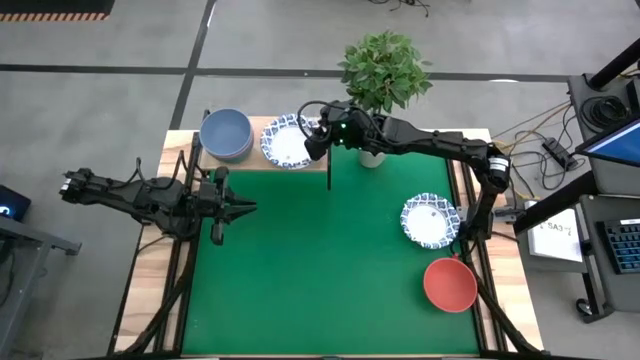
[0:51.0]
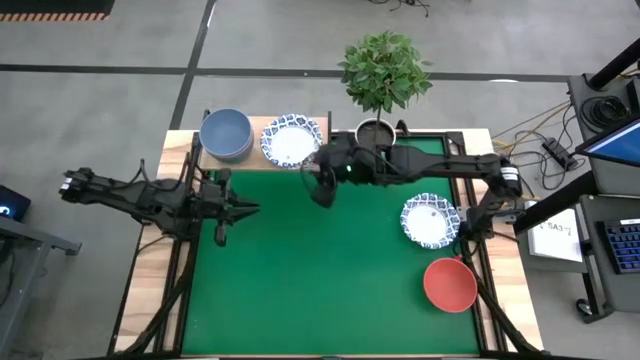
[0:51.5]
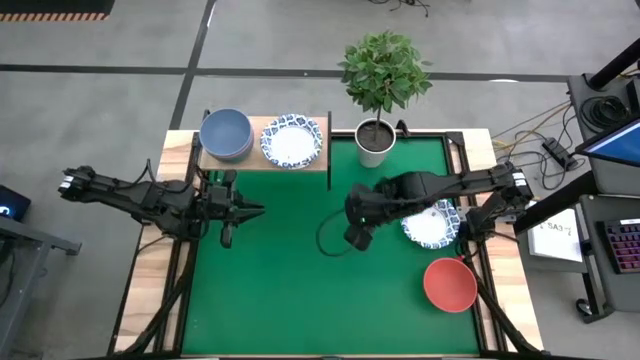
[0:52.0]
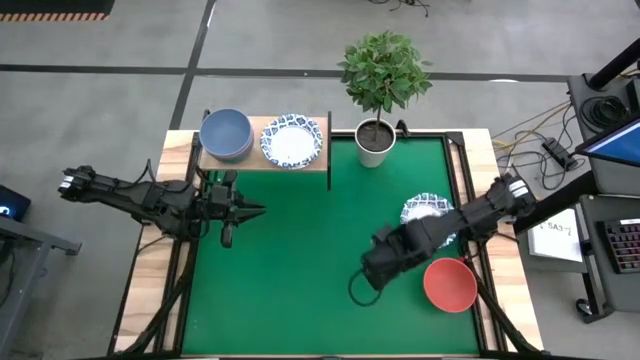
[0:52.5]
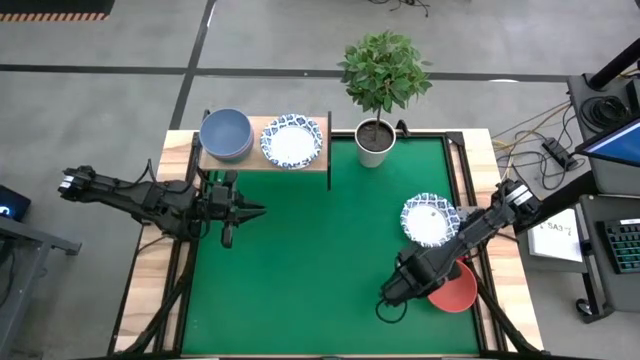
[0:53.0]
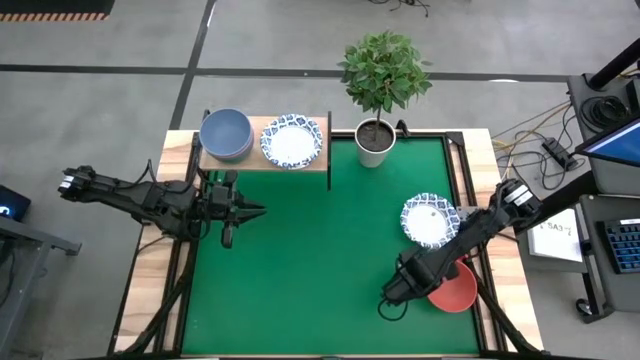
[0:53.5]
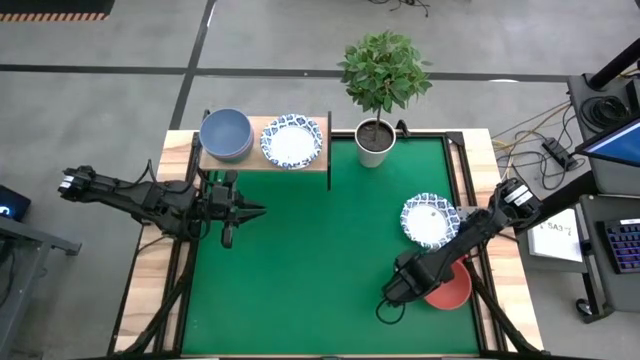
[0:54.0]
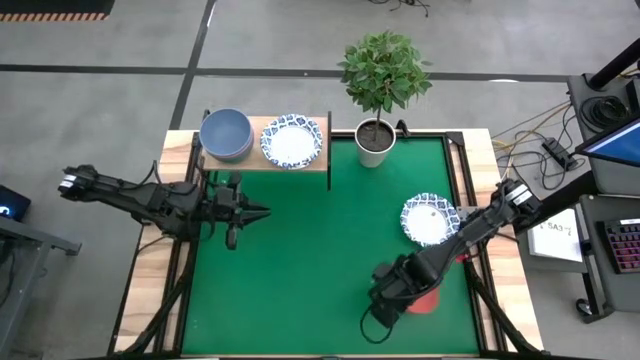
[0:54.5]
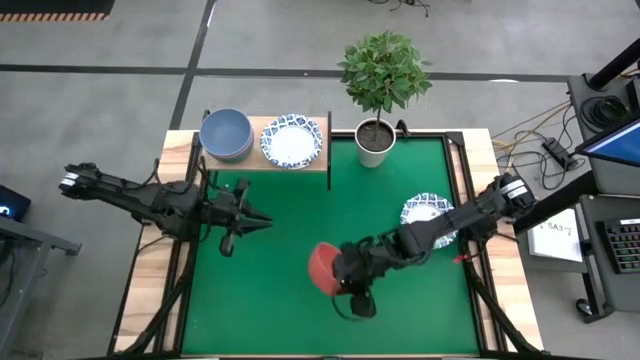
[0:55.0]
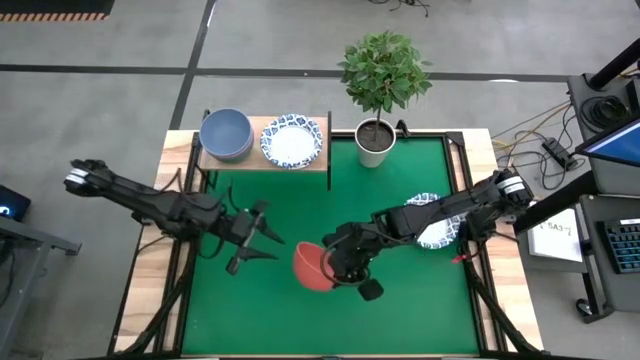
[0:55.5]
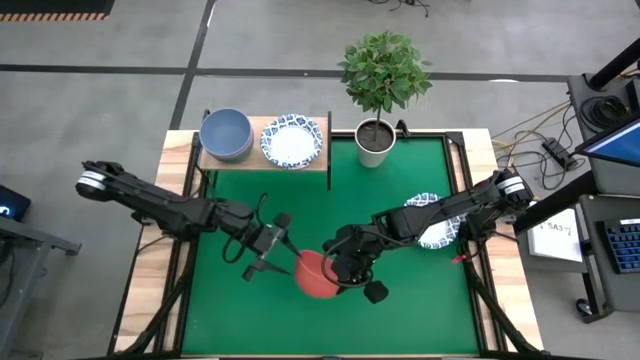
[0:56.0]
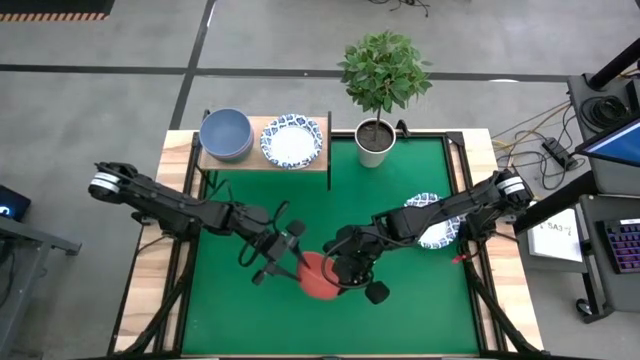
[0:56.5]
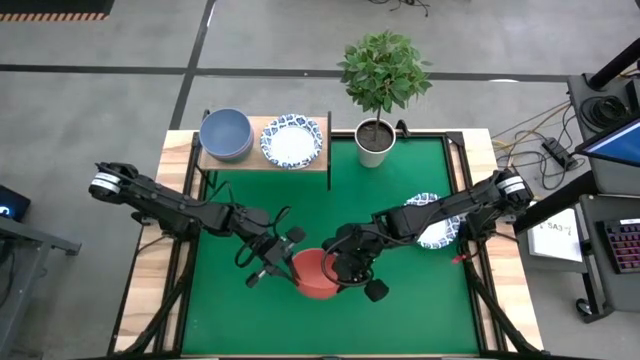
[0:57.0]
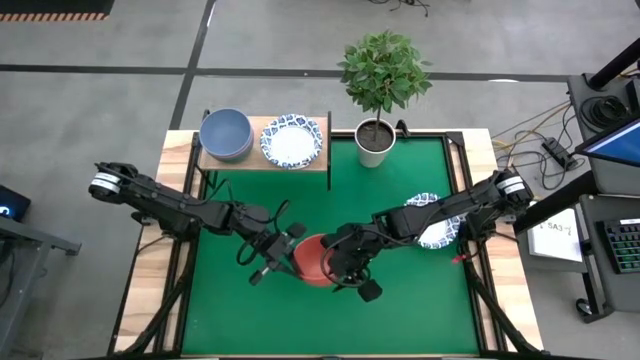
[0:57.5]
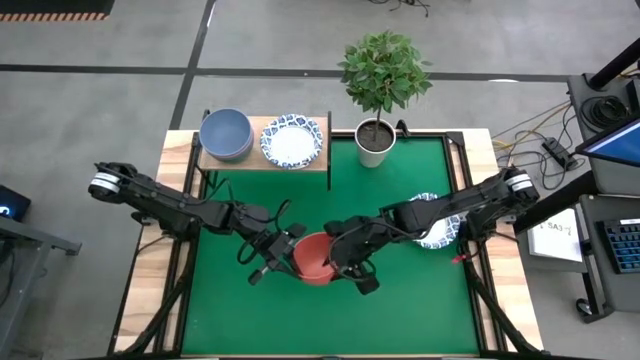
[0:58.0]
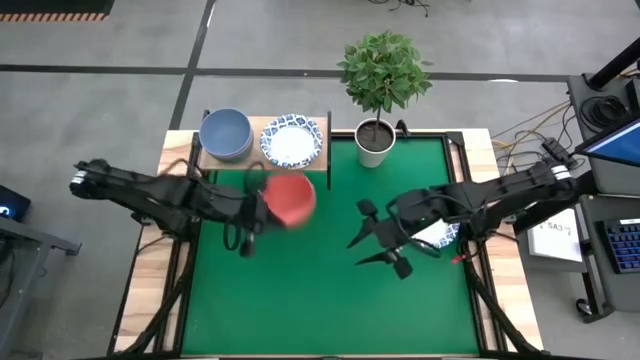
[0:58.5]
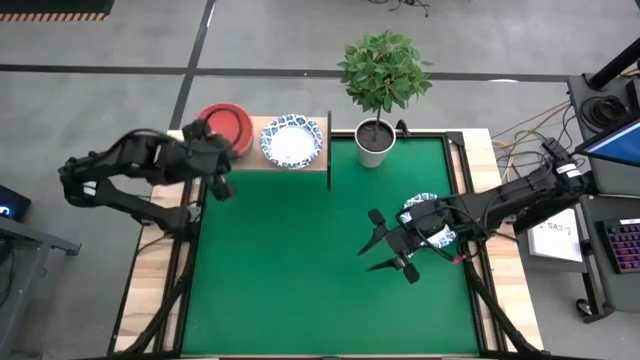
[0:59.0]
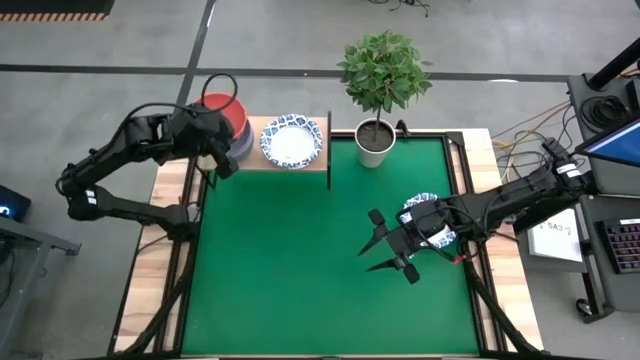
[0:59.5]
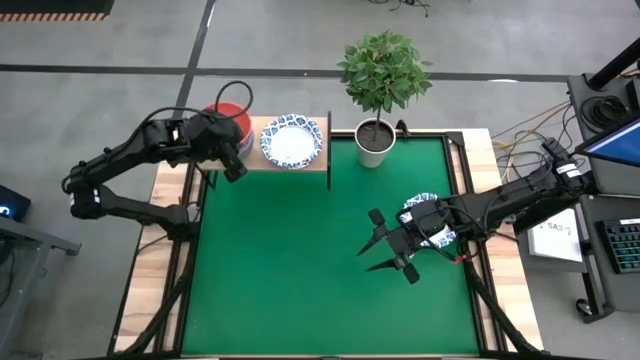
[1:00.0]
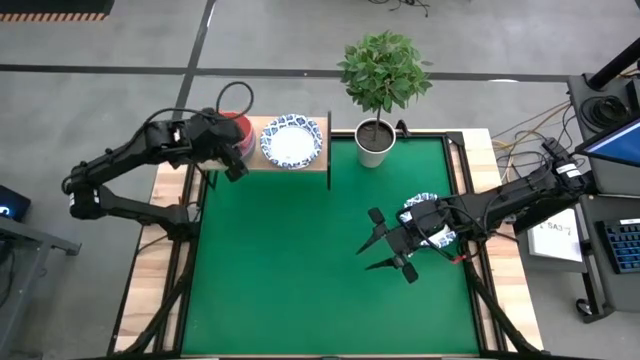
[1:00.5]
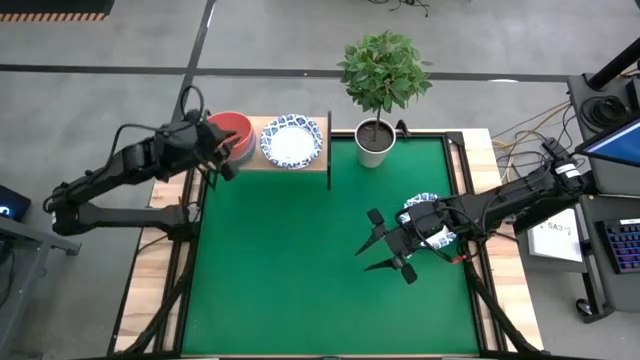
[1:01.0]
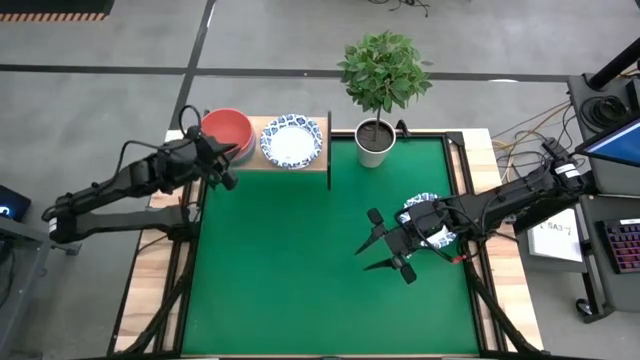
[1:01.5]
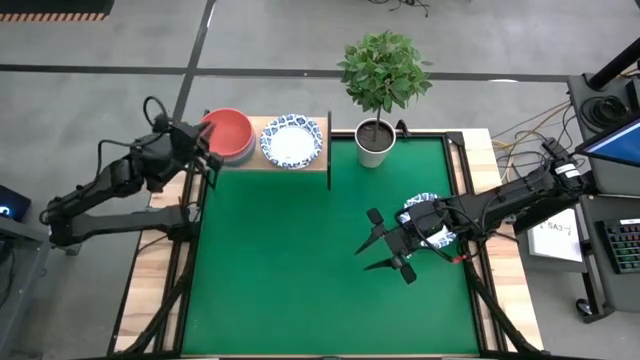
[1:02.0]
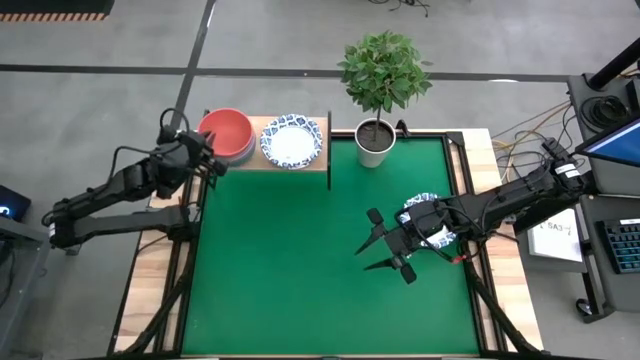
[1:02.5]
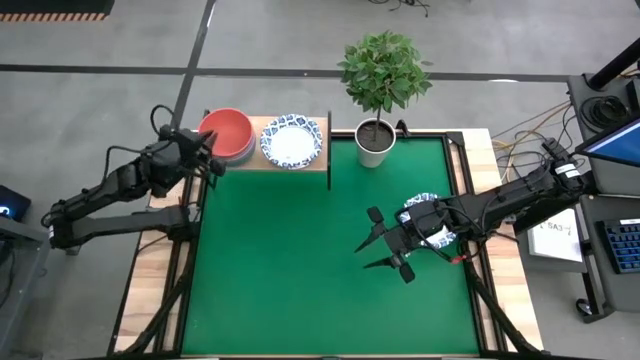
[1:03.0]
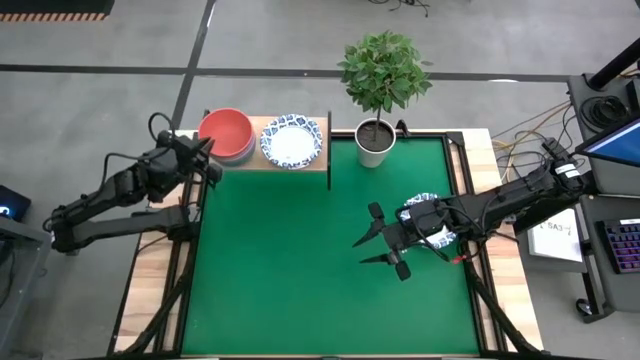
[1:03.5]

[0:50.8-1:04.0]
Task: Place and stack bowls onto a shelf
Stack the orange bowl on top of the blue bowl on the shelf

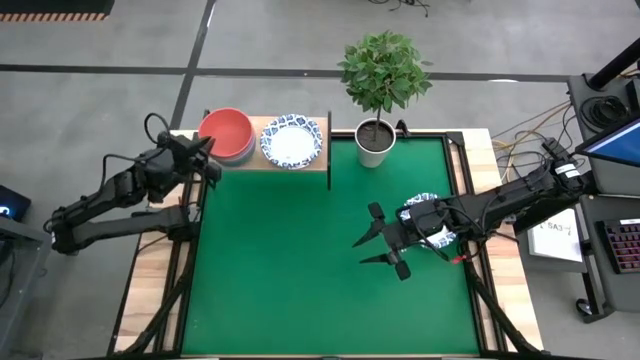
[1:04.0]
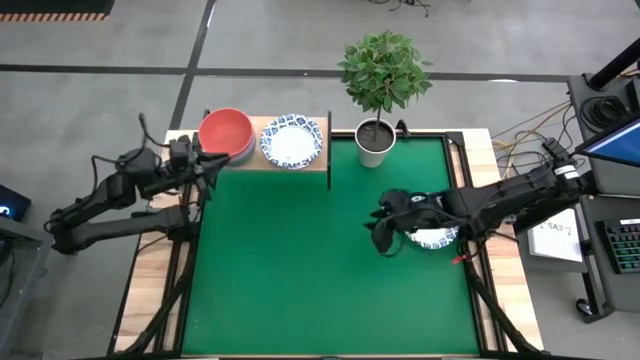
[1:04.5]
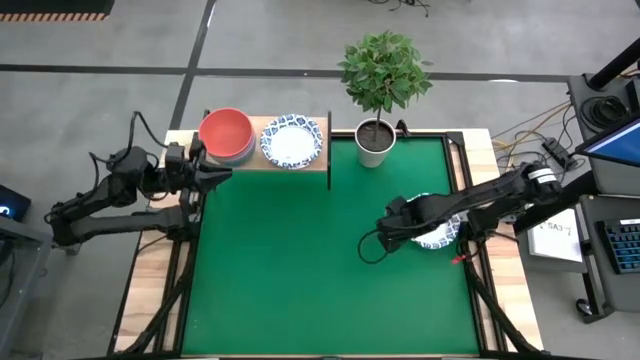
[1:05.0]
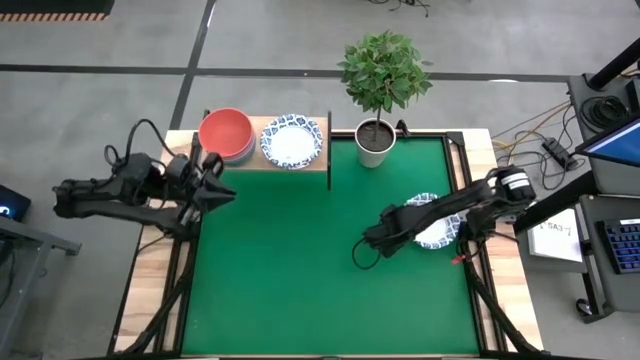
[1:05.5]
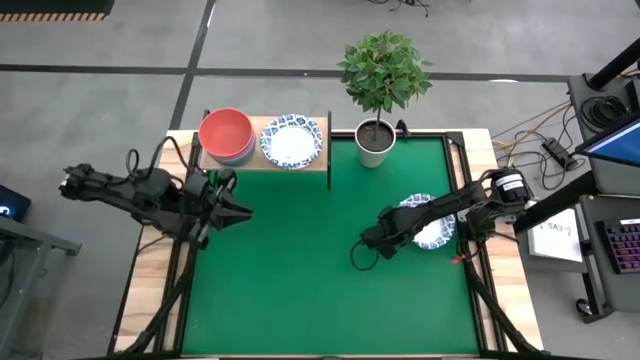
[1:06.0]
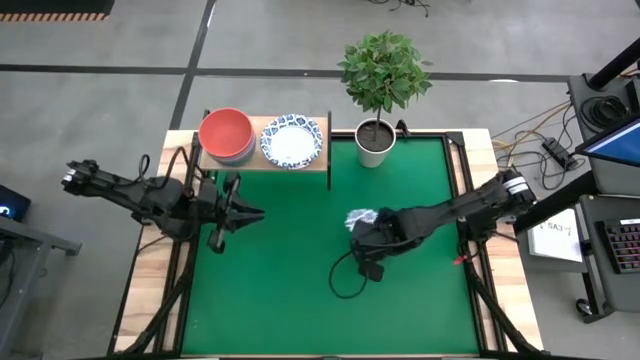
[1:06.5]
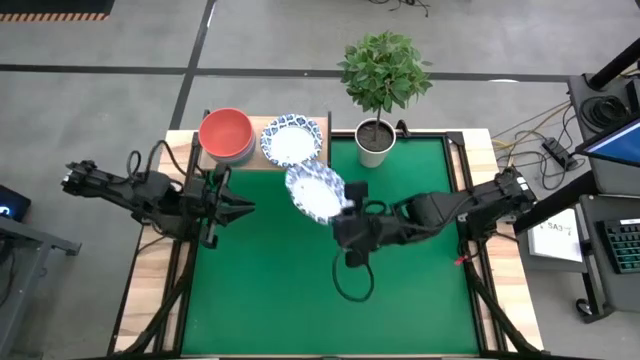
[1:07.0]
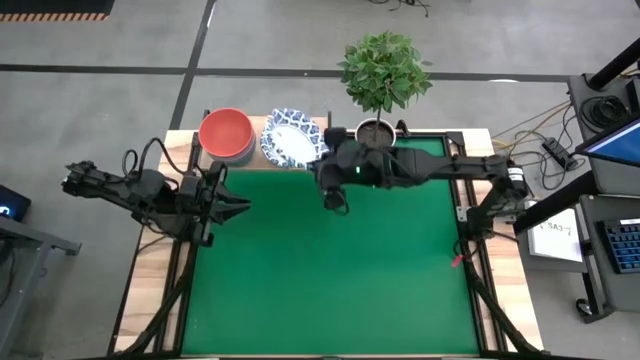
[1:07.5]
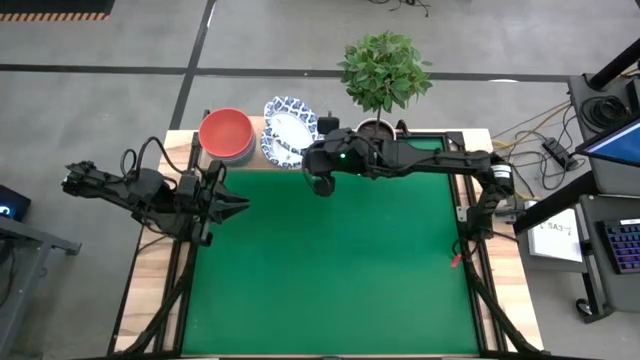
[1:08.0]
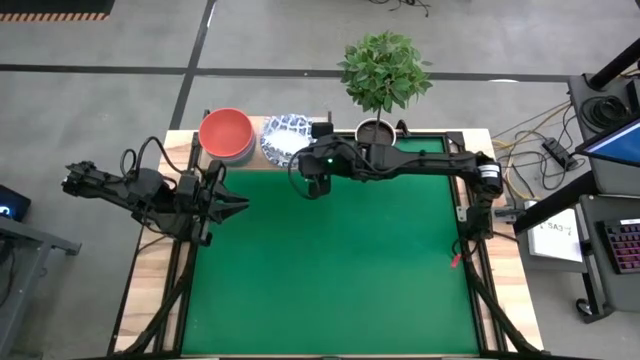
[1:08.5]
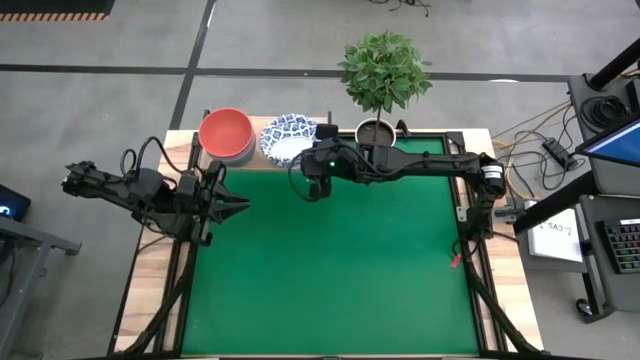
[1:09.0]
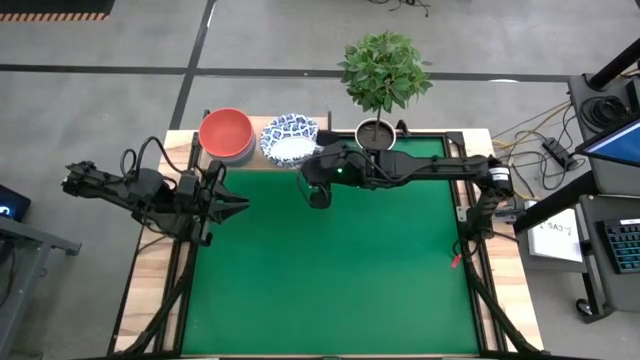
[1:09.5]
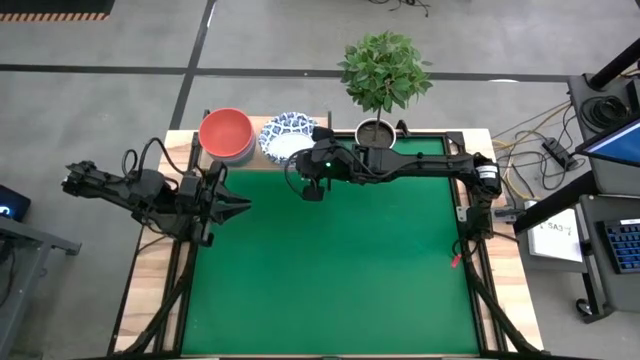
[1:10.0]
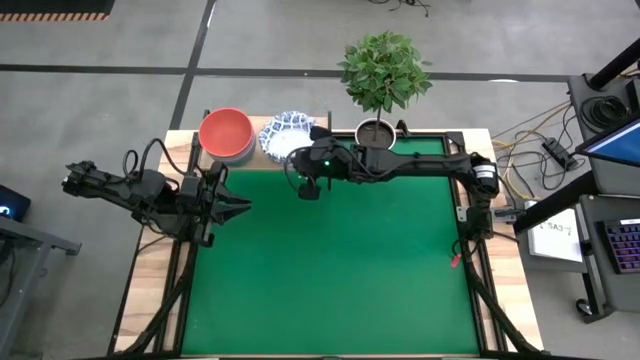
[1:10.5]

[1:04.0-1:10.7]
Stack the white patterned bowl on top of the white patterned bowl on the shelf

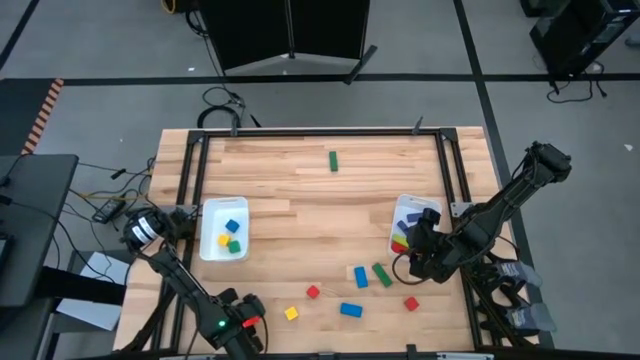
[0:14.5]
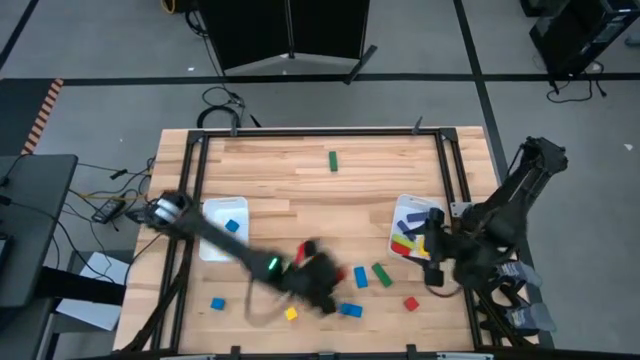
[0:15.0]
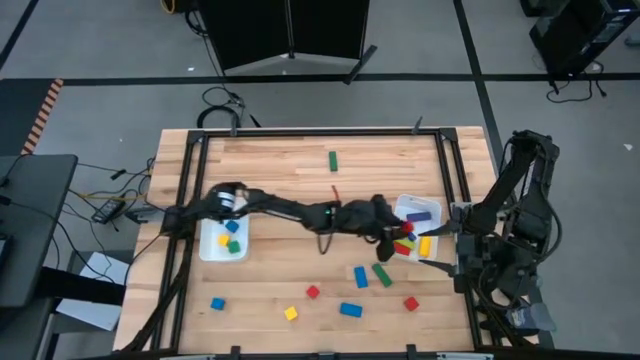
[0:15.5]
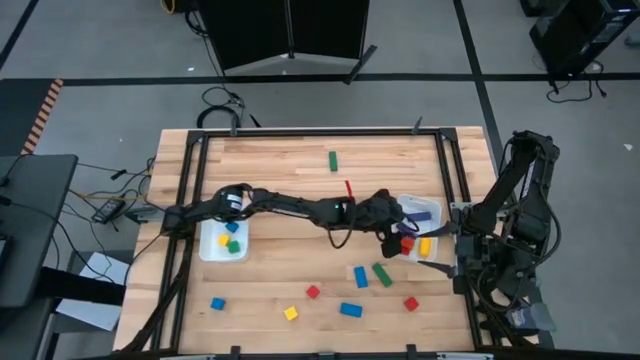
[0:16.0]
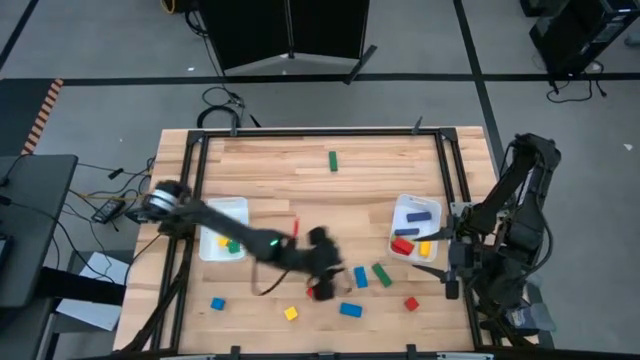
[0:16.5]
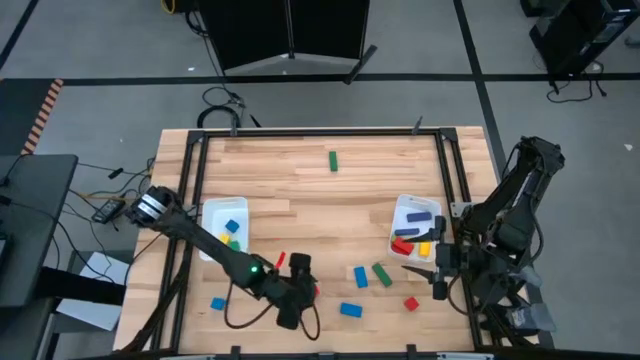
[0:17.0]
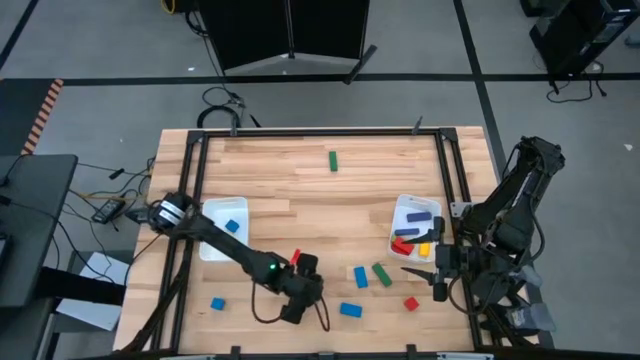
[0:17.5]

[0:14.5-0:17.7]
Task: Sort blocks by size
Put the red game piece into the right bin
